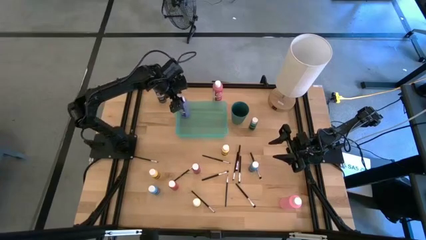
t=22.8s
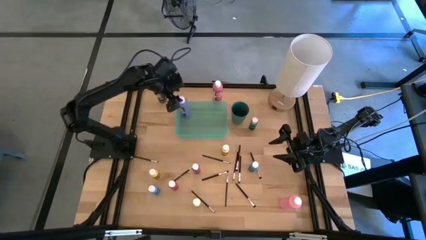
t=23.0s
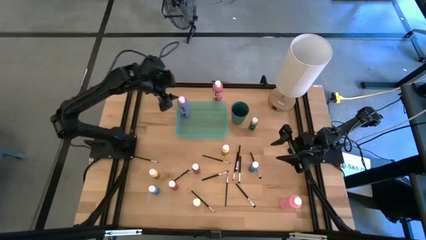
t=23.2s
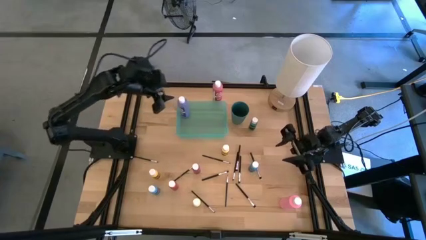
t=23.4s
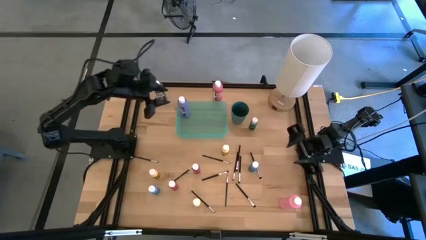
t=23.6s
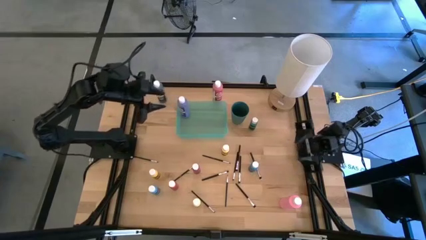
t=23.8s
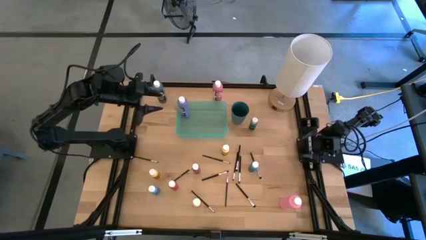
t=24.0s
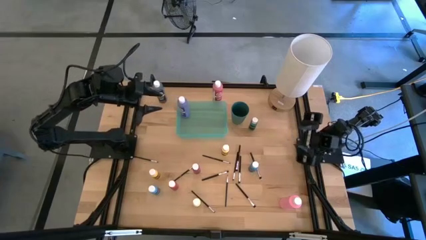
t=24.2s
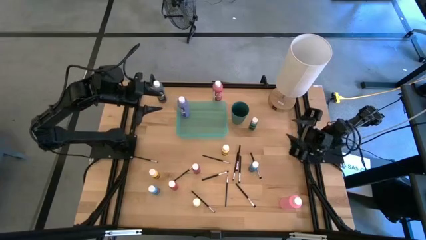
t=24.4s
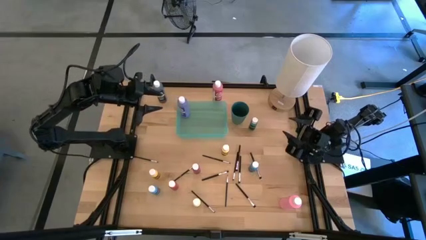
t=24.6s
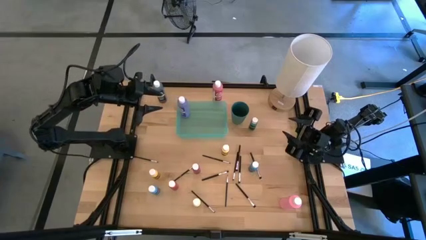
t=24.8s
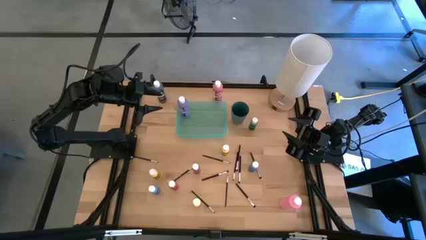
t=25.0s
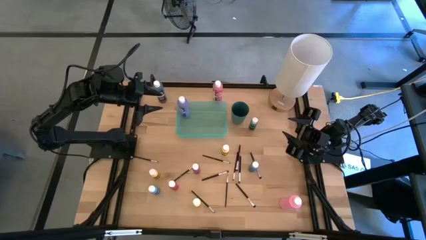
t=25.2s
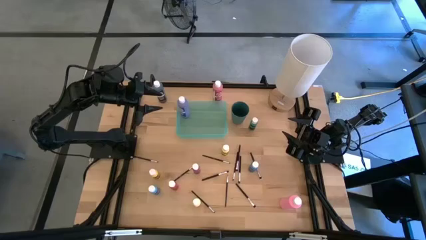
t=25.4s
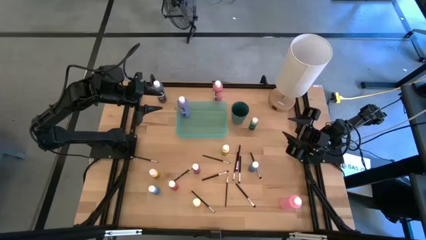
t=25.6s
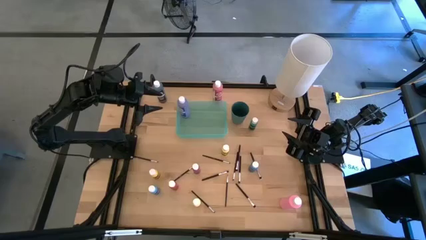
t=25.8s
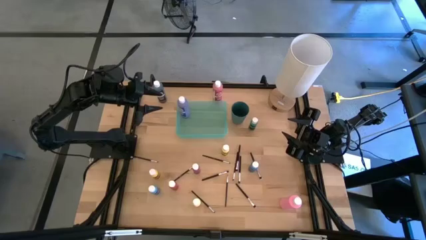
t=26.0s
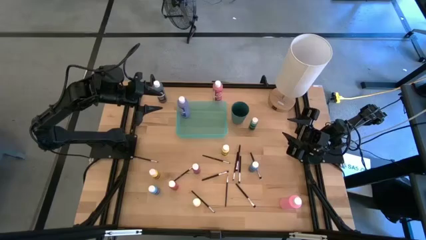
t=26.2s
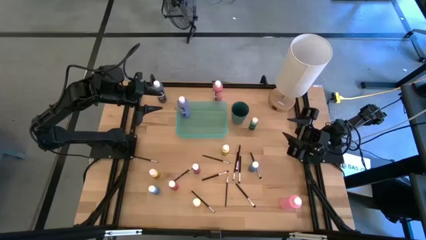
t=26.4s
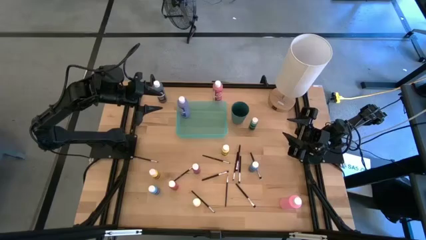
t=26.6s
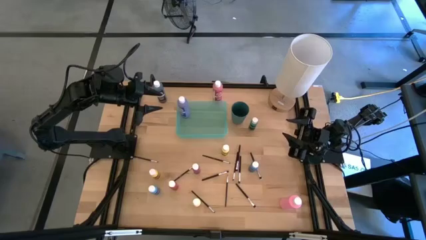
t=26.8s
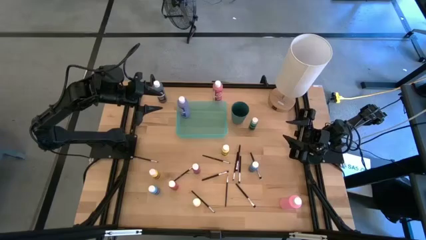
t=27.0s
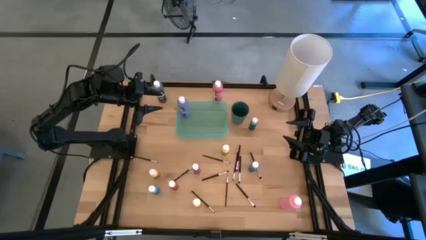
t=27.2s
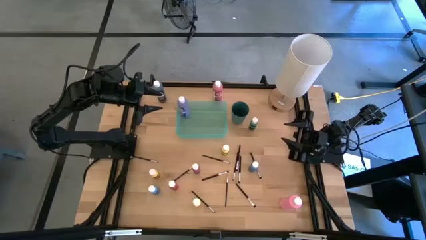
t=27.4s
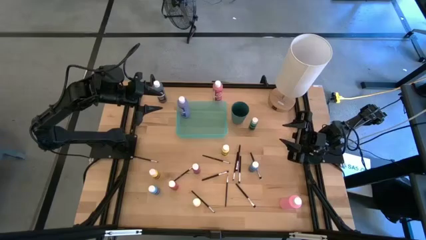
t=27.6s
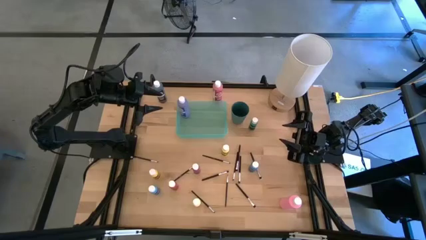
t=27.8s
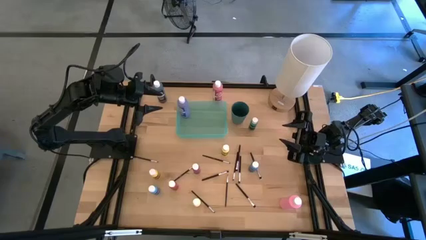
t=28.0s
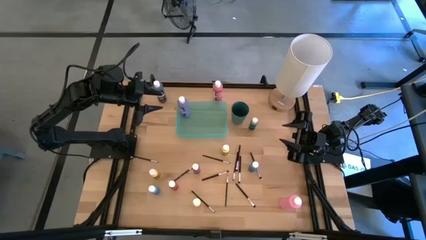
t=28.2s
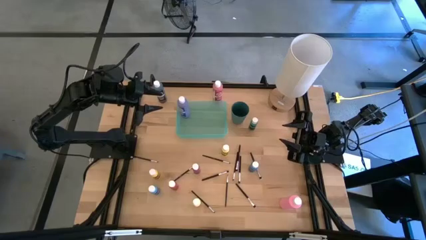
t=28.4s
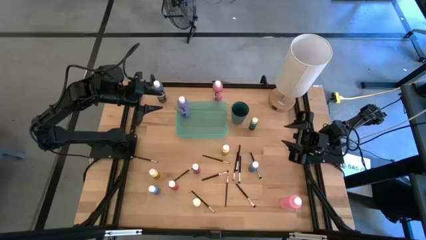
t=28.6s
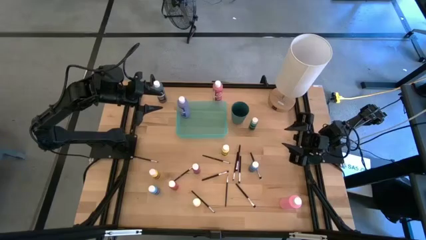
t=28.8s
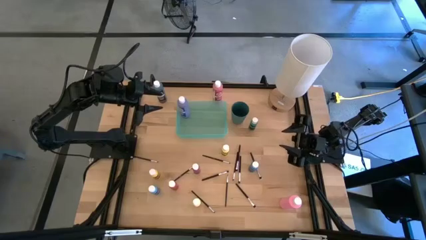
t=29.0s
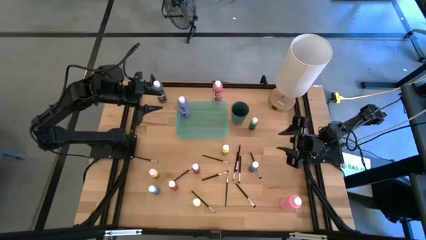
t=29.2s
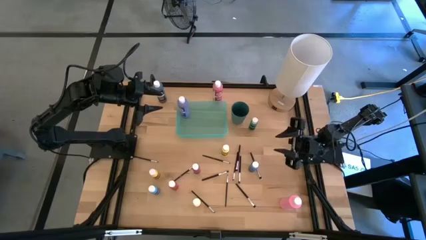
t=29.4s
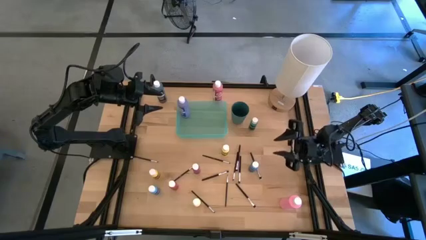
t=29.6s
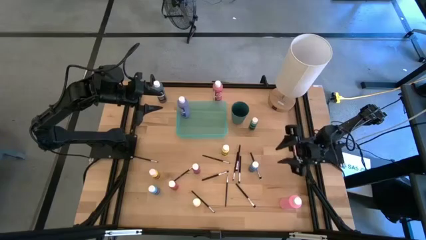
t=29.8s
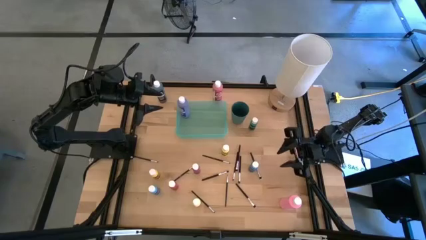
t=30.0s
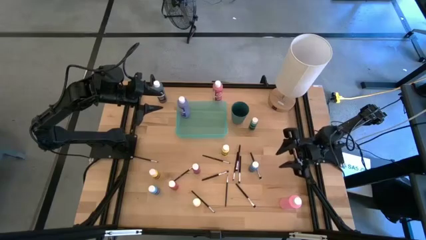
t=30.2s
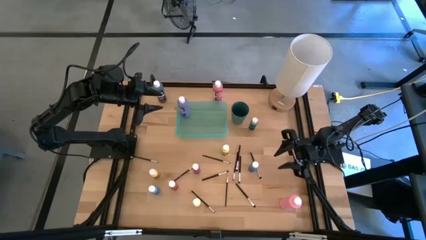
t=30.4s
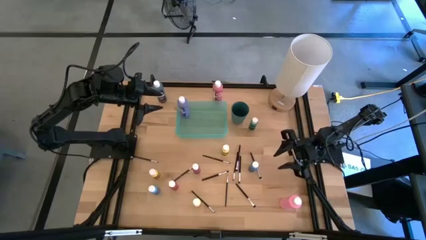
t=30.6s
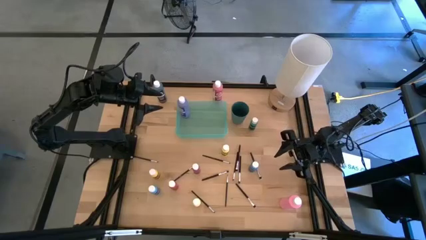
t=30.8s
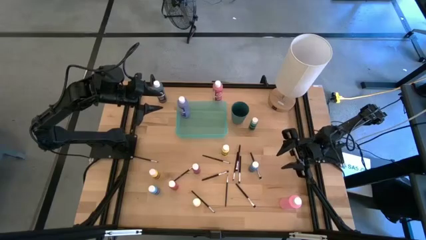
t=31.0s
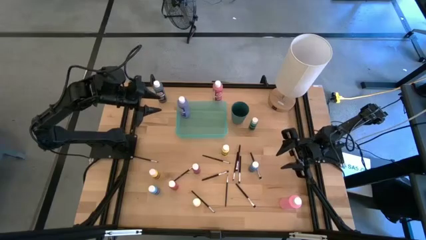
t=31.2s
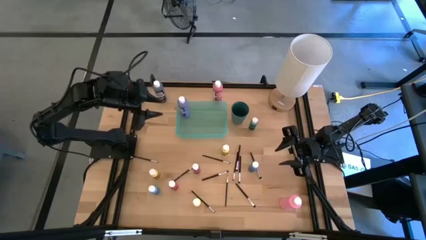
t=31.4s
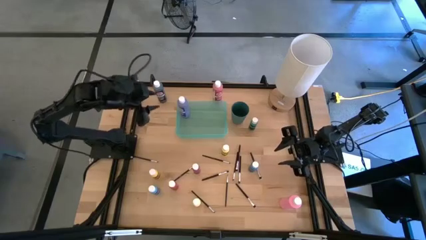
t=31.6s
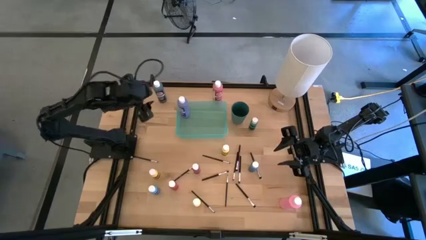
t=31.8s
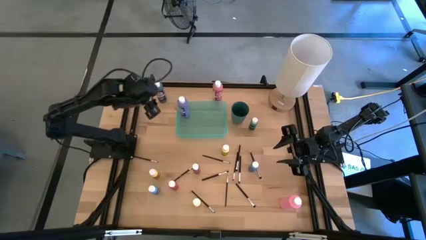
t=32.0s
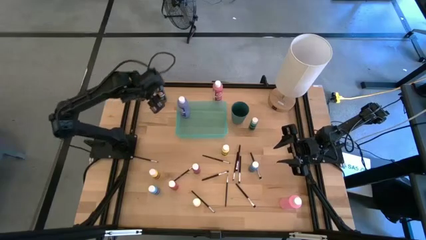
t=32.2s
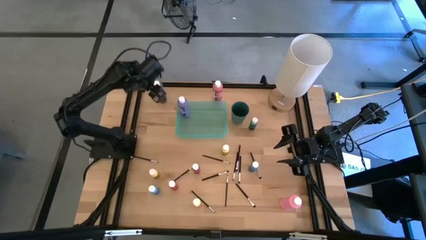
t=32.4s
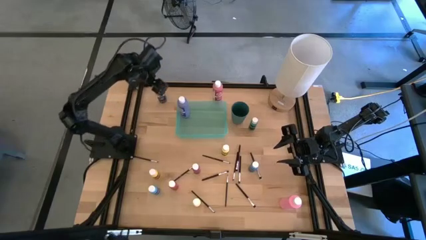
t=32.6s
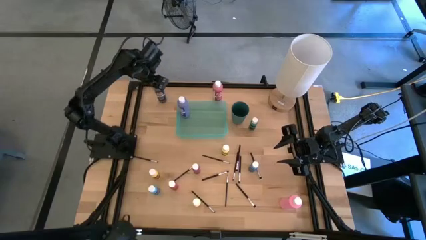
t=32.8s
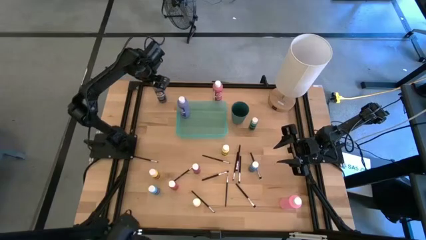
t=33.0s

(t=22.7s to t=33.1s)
Task: Pick & Place Paint Supplies
Put the big dark green paint bottle into the green bin

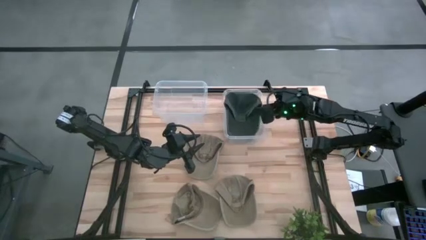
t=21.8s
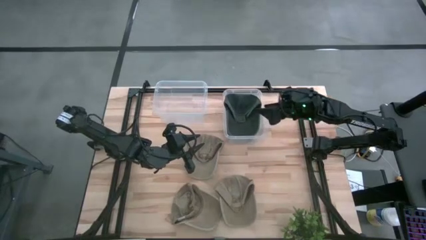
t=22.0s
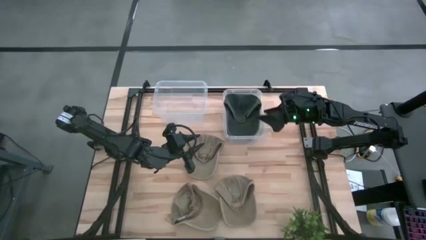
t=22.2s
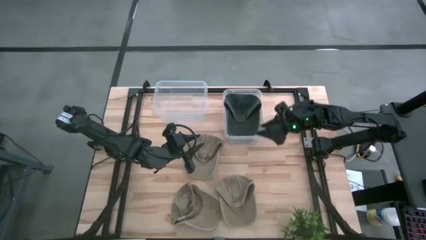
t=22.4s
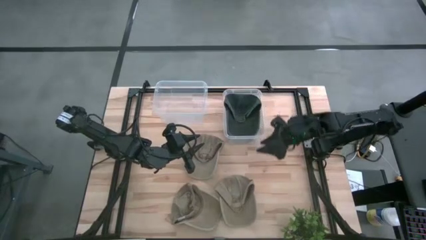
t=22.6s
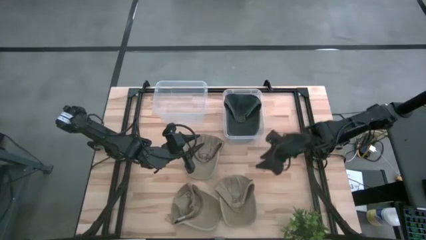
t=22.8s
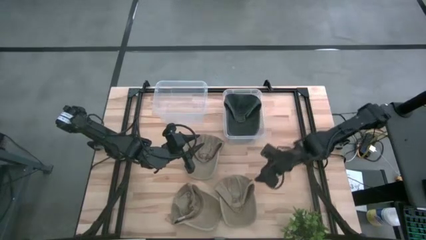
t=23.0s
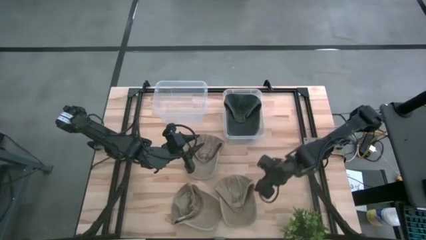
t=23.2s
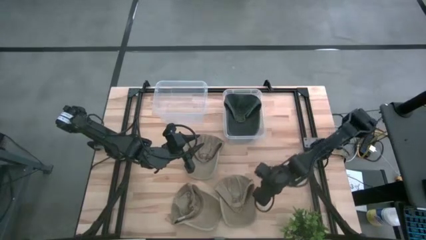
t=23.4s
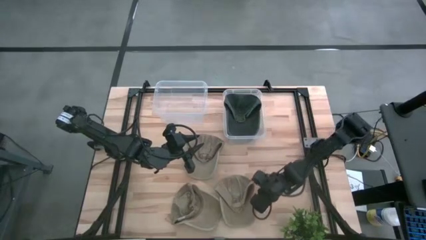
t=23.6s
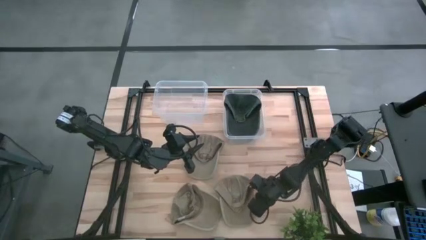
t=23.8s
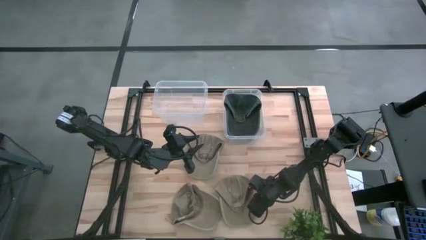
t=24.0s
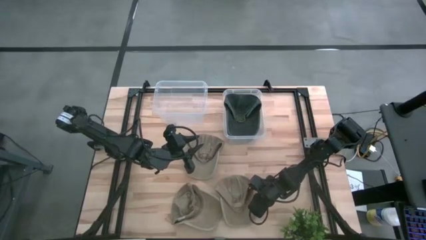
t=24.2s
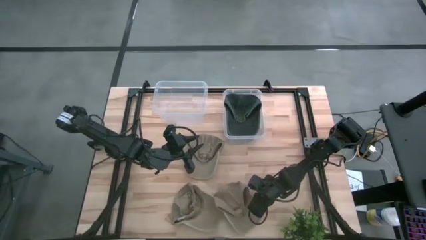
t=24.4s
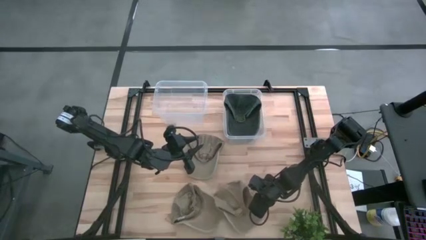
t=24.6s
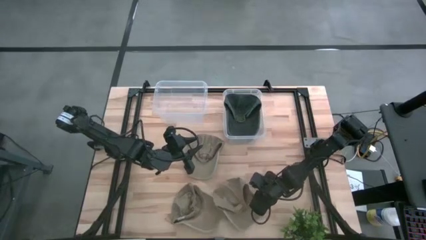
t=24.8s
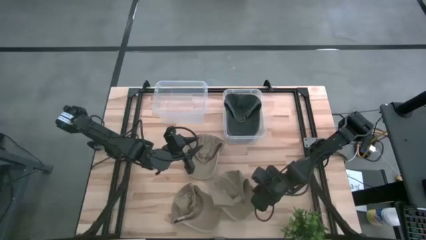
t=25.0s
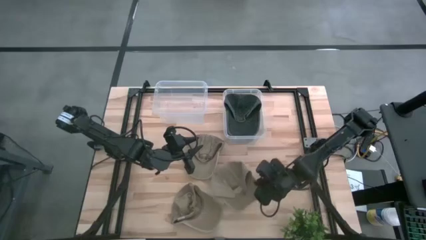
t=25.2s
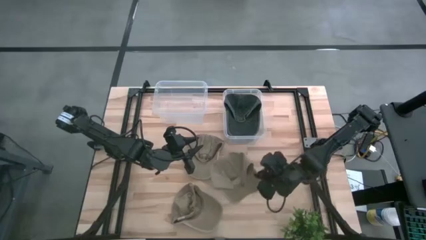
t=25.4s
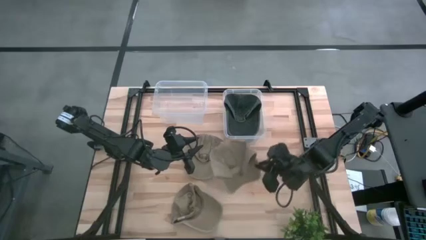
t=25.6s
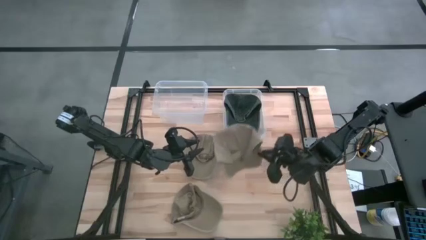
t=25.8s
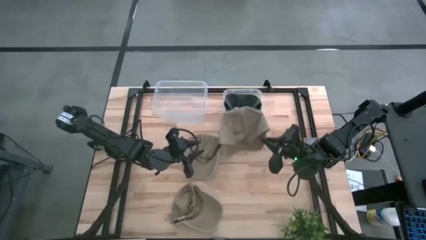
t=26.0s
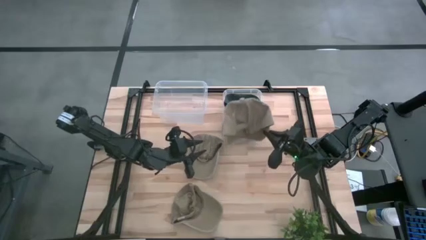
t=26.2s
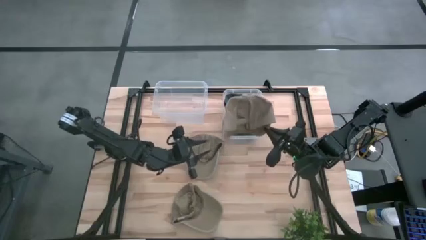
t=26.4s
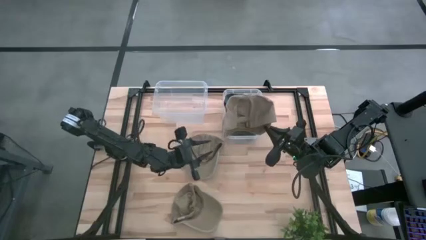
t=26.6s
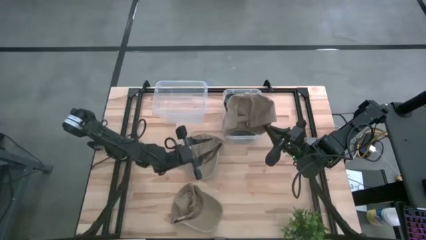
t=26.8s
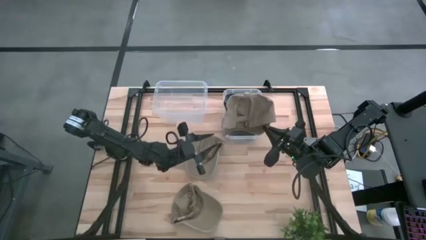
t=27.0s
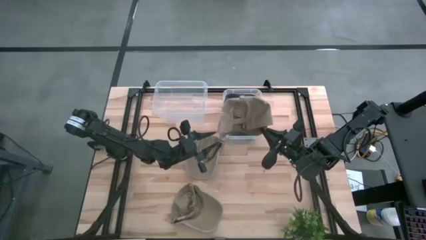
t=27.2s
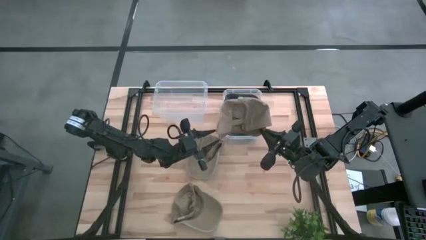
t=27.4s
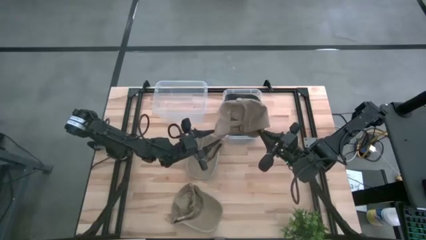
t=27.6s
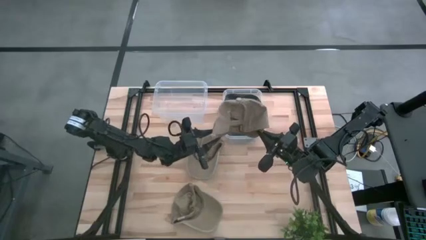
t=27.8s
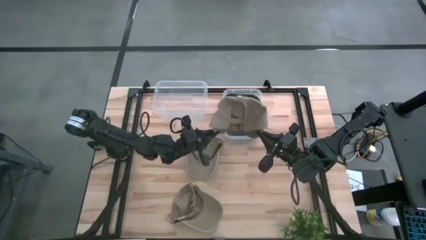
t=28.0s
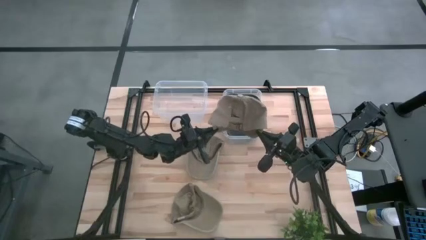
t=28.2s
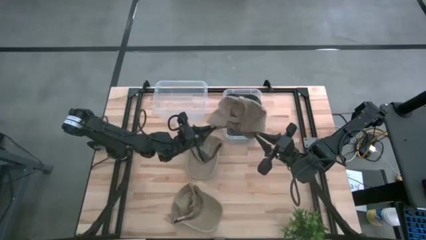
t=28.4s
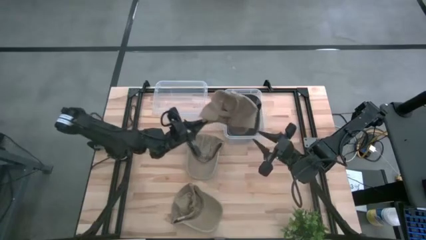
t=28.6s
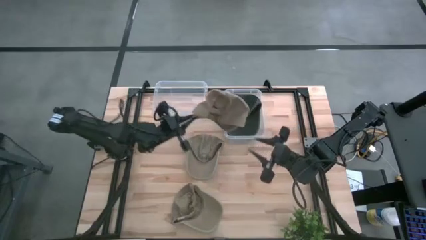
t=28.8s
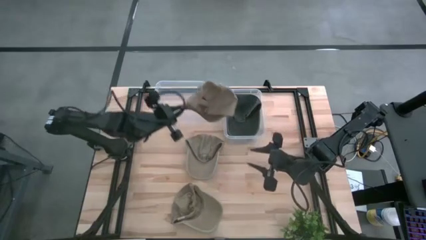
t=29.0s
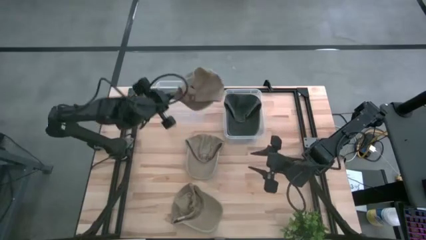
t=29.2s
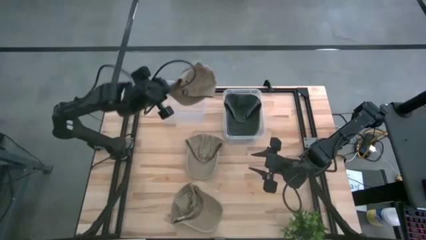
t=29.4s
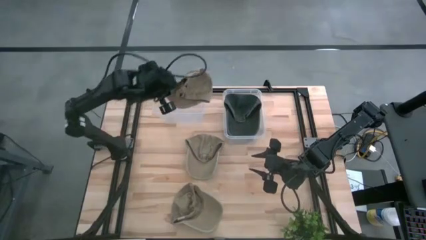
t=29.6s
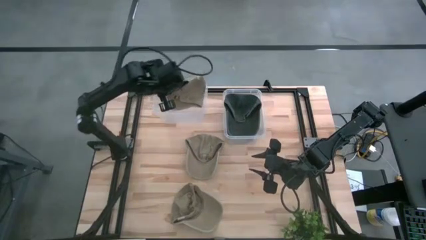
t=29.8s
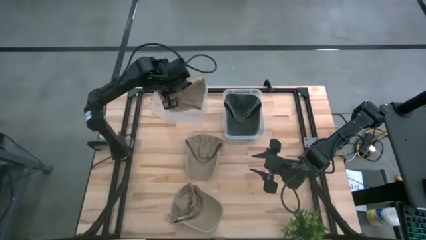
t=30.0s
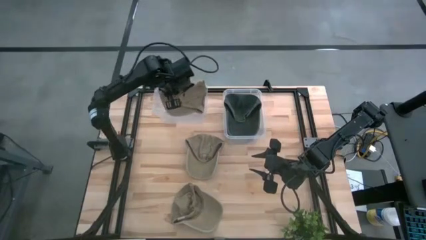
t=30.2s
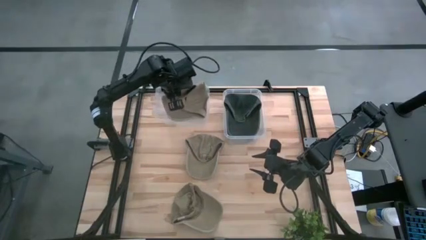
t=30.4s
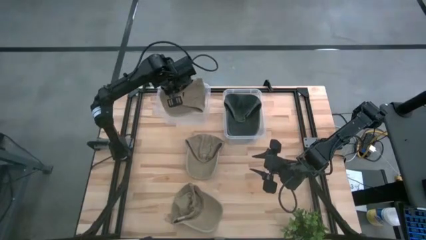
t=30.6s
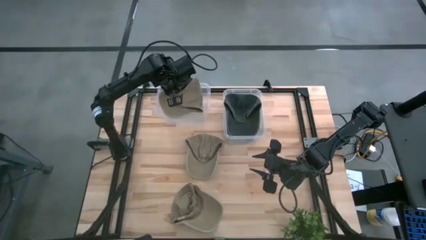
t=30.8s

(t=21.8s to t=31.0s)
Task: Pick & Place hat
Put the bottom right light brown cap into the left transparent bin
